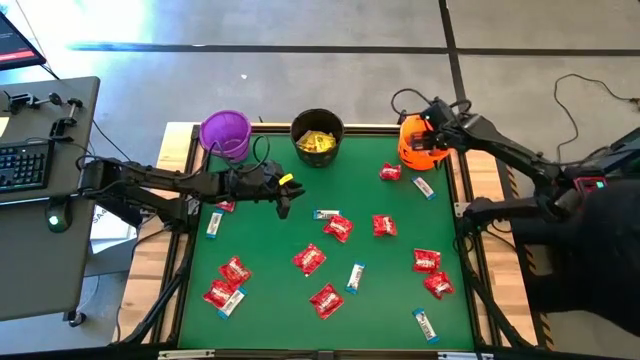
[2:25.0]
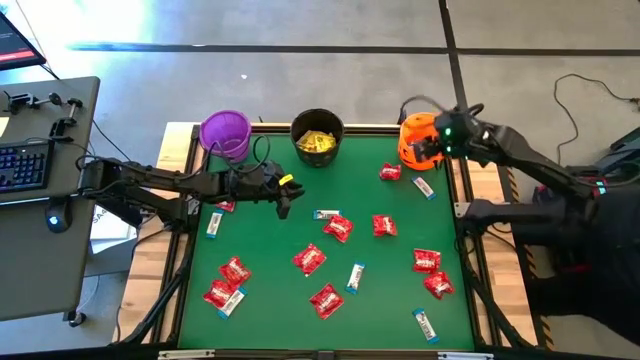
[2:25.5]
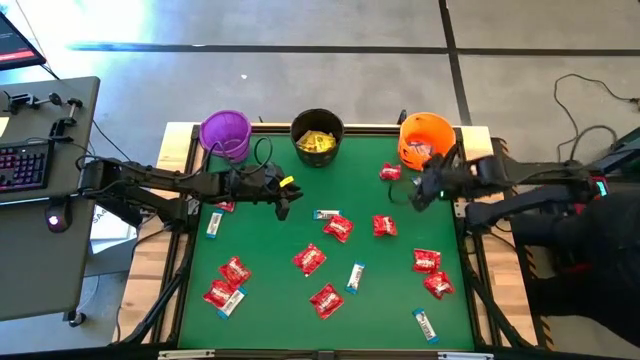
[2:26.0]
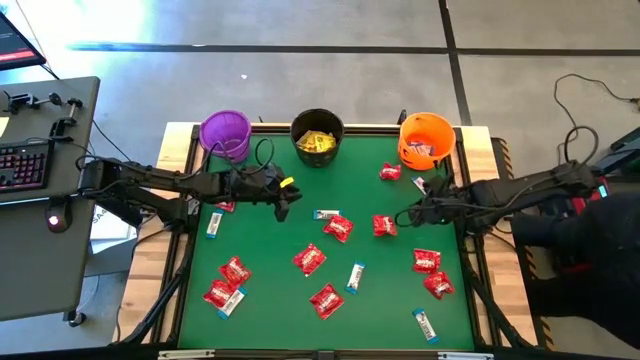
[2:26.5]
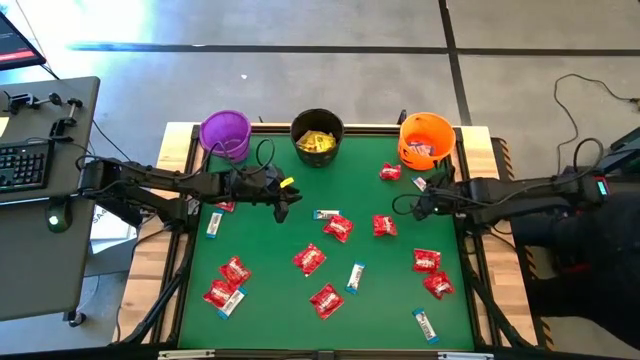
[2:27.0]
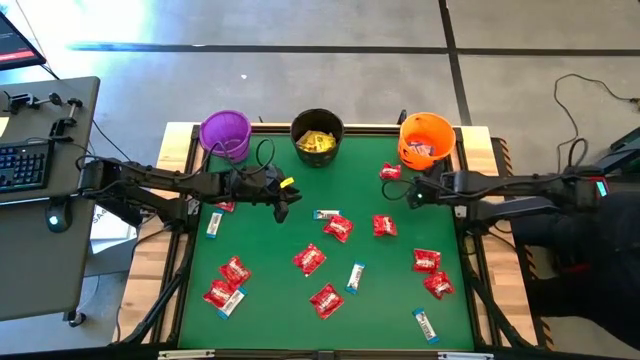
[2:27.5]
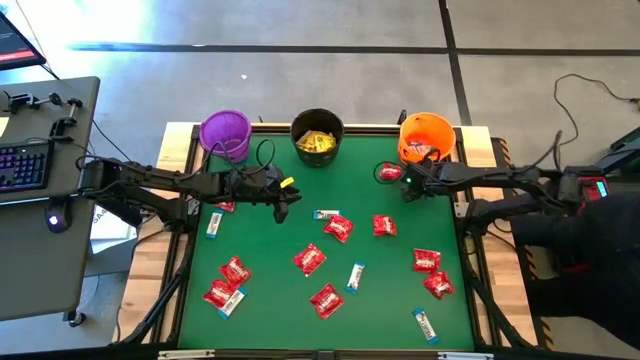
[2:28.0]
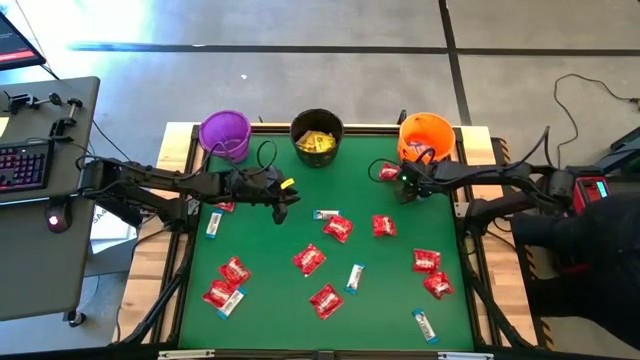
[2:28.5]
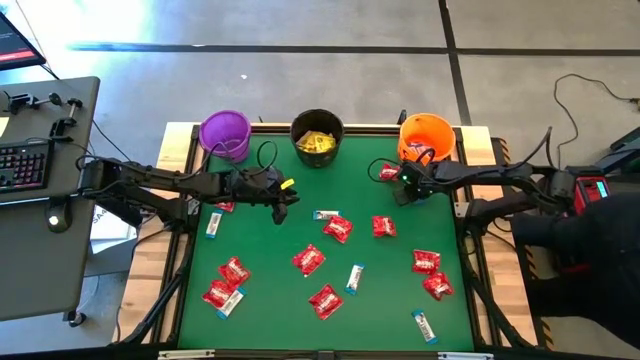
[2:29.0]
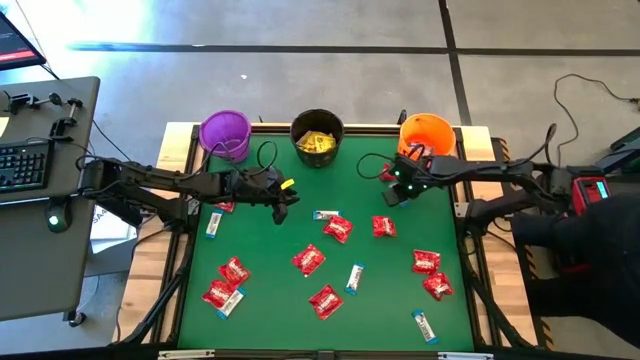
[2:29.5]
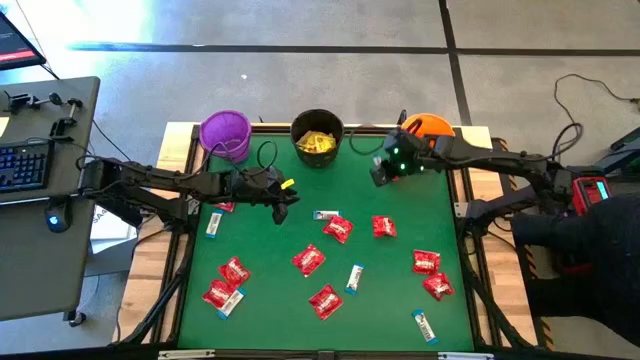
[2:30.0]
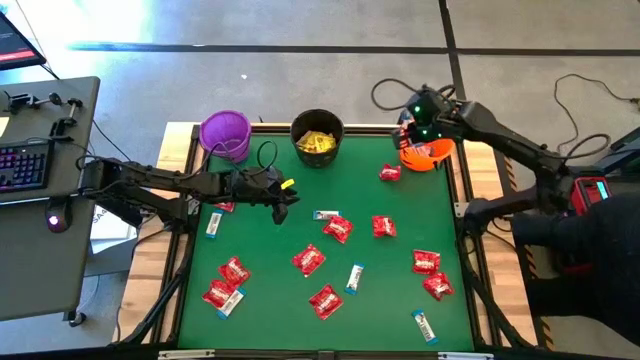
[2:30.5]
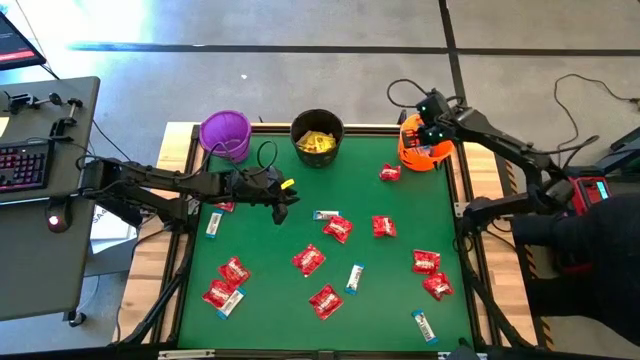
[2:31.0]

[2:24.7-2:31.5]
Task: Sort candy by brand, put in halloween buckets
Put the blue chocolate bar into the orange bucket

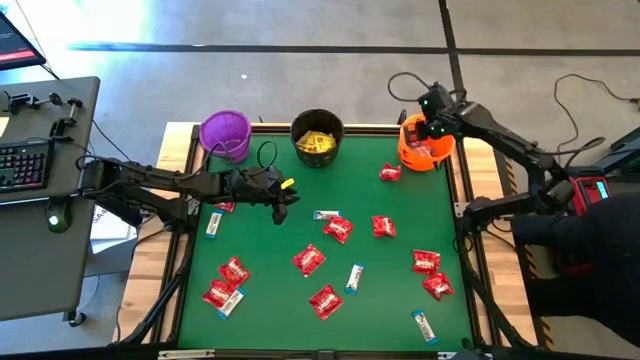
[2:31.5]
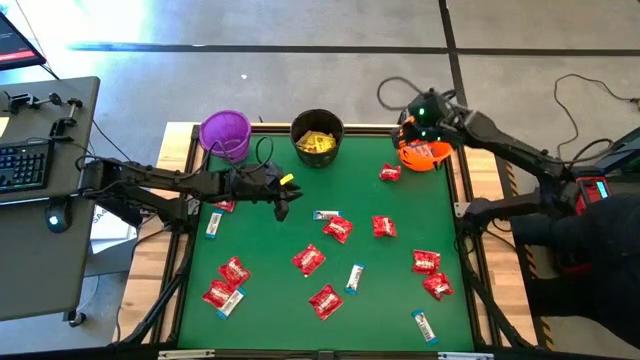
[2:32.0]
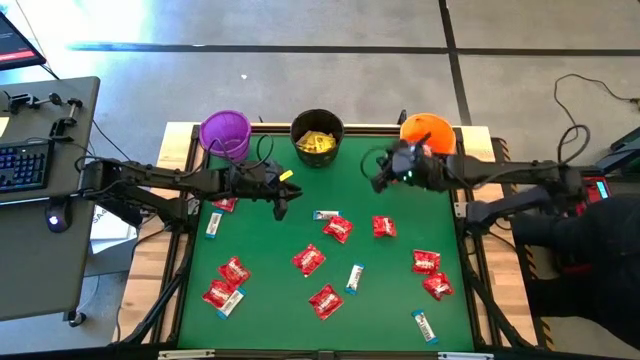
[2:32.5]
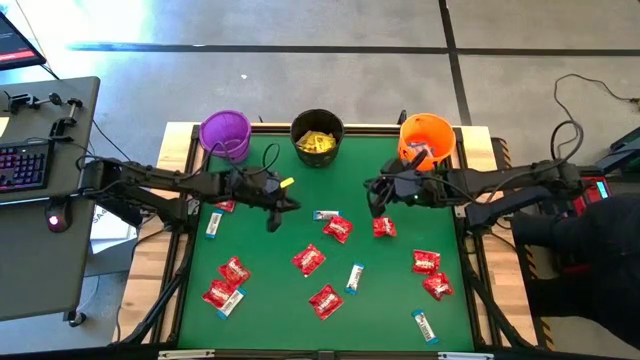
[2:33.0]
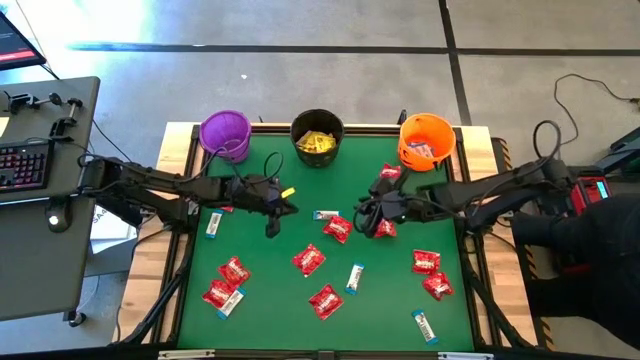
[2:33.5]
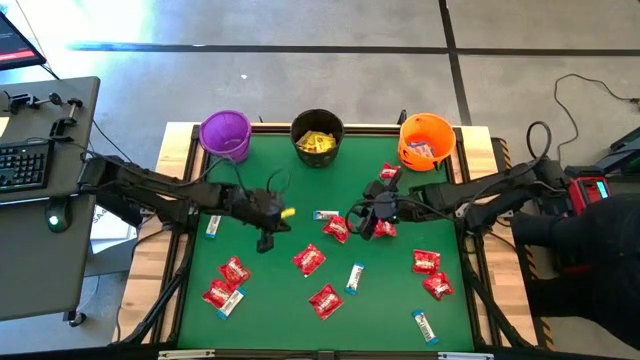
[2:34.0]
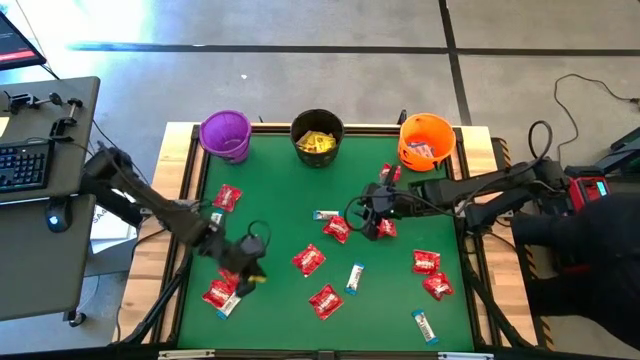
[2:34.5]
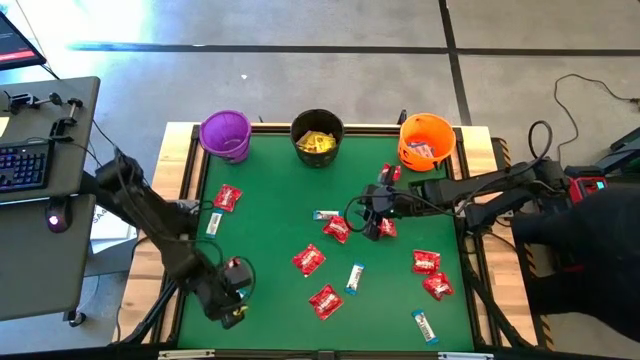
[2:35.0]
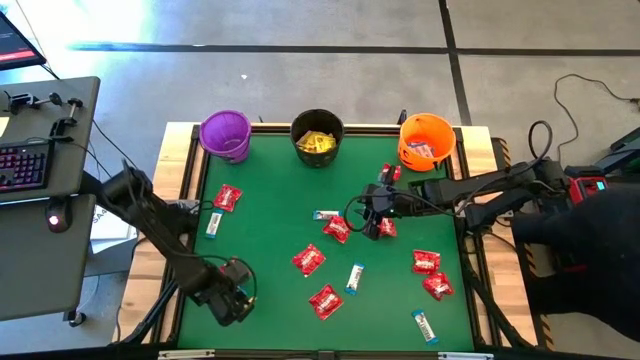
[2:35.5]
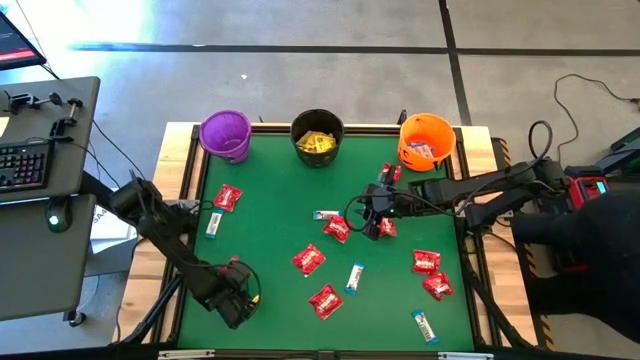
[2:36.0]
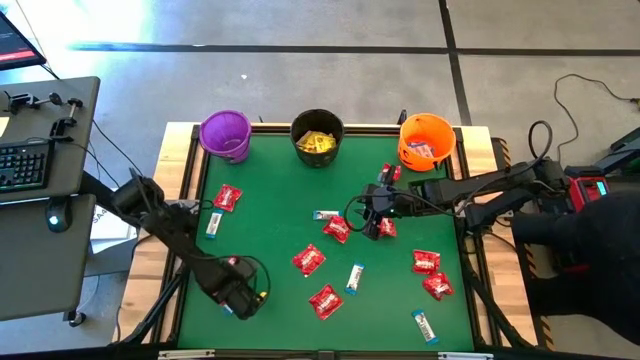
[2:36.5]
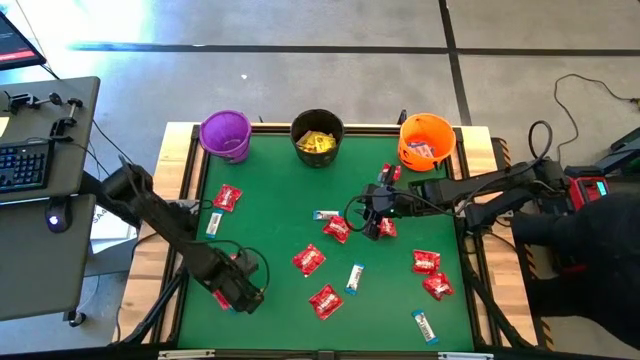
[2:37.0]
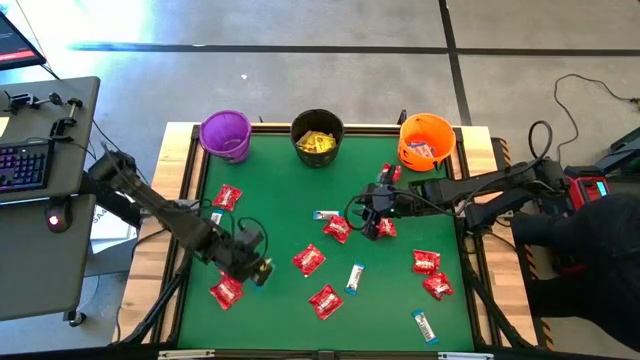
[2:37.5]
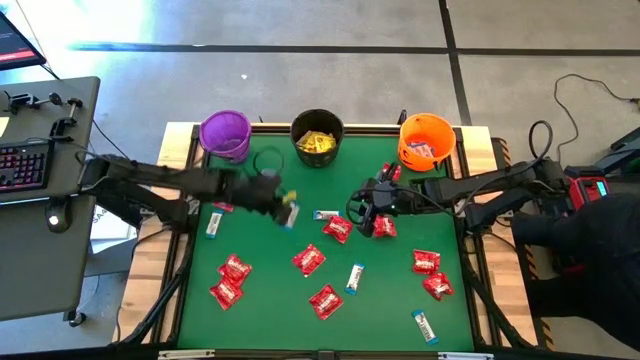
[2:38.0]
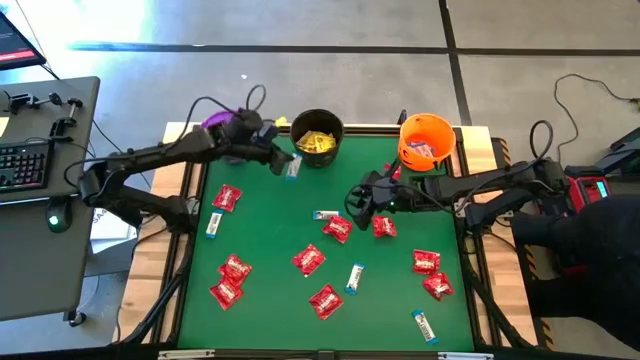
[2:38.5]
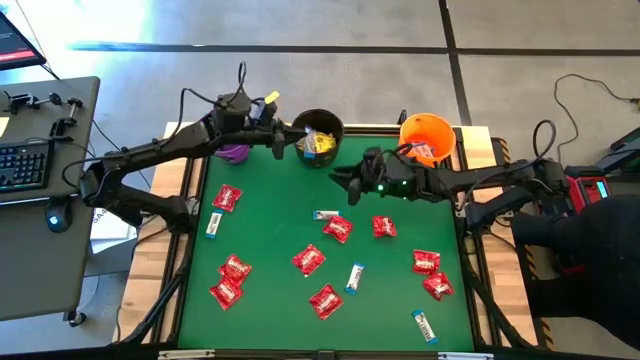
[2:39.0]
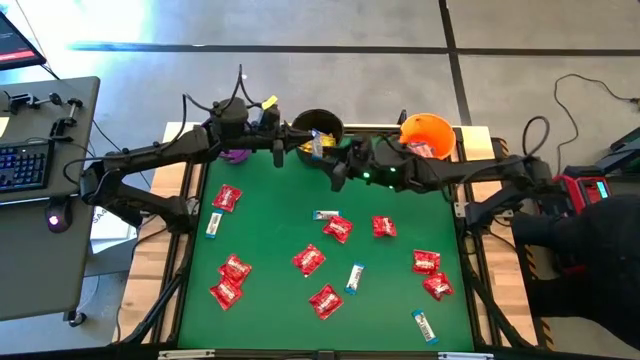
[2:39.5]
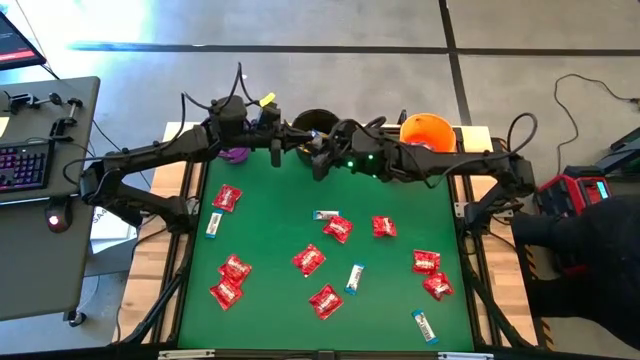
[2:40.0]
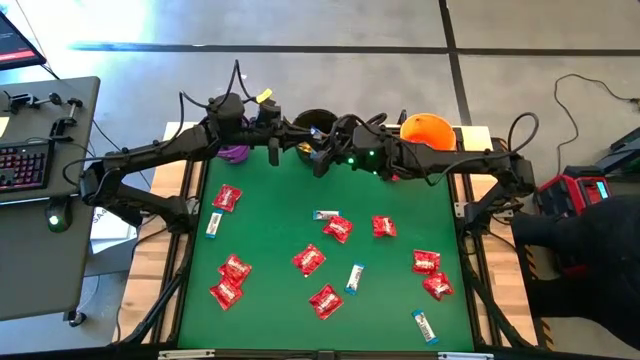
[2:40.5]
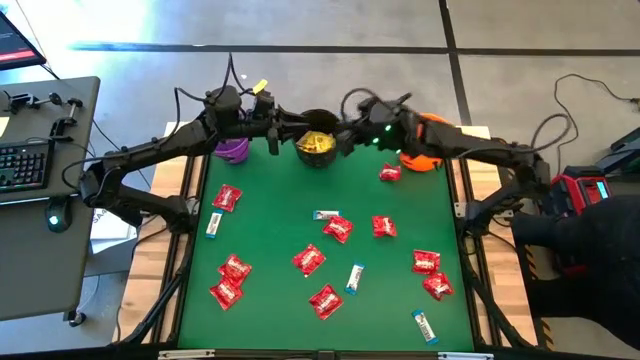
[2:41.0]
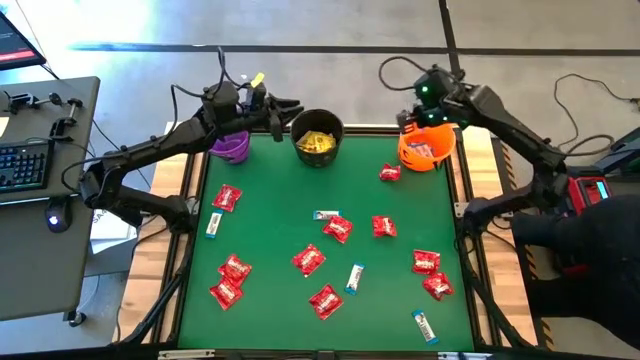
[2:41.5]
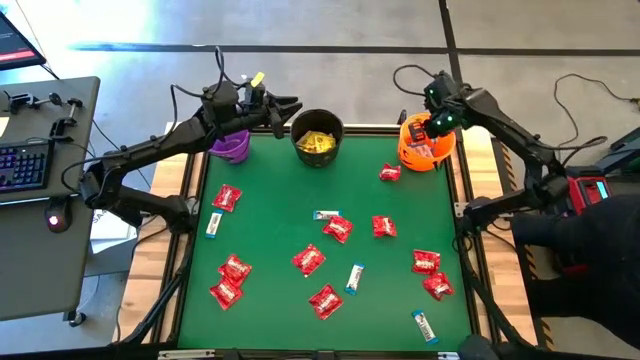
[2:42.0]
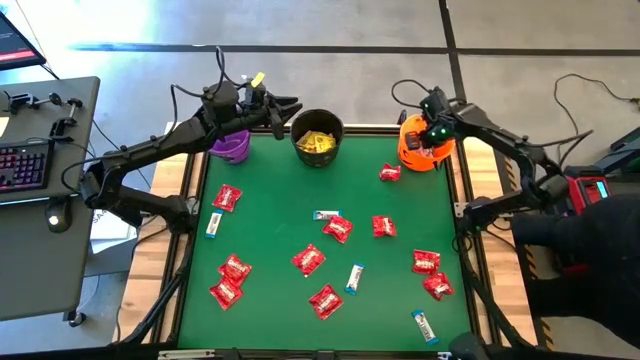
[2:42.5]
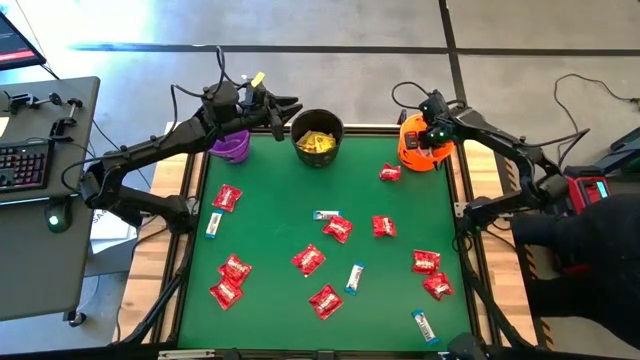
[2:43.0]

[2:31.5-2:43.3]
Put the blue chocolate bar into the orange bucket

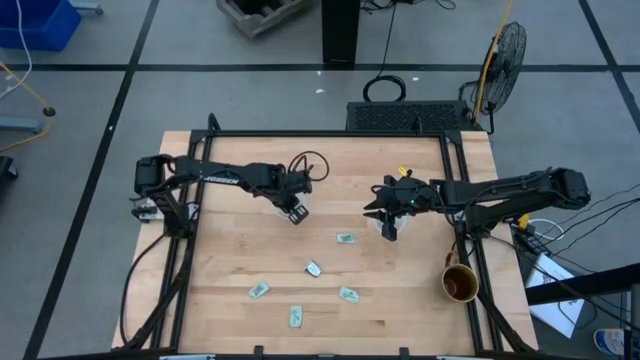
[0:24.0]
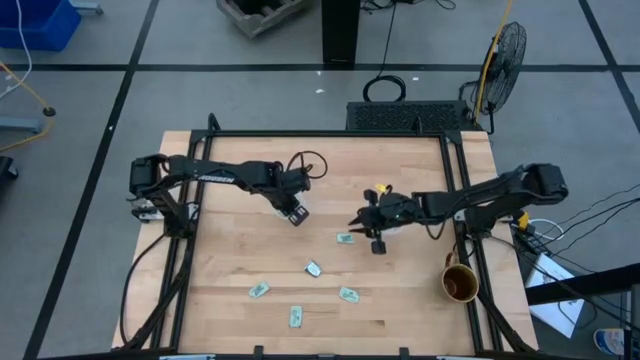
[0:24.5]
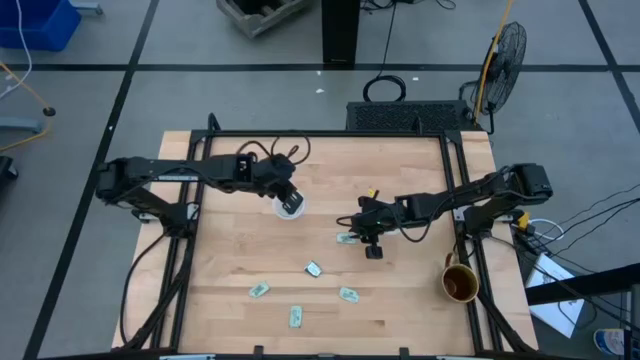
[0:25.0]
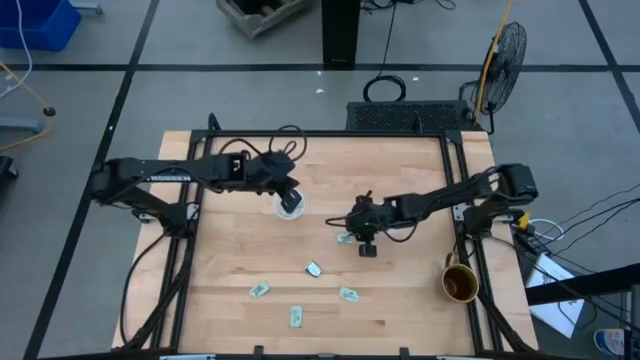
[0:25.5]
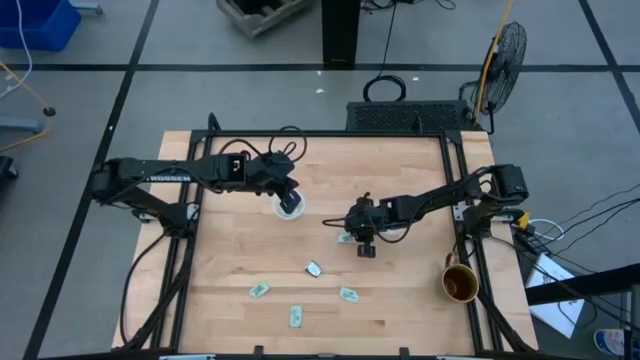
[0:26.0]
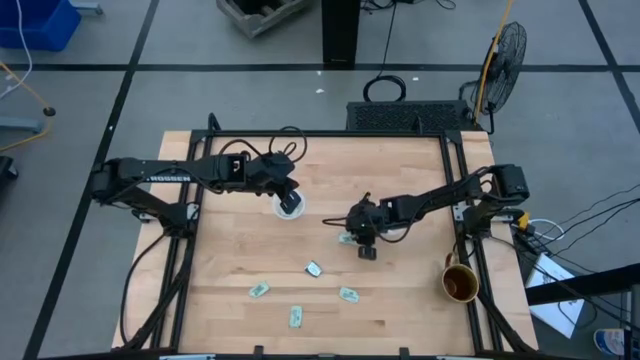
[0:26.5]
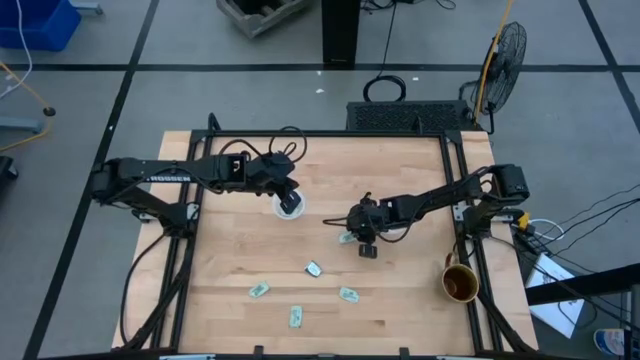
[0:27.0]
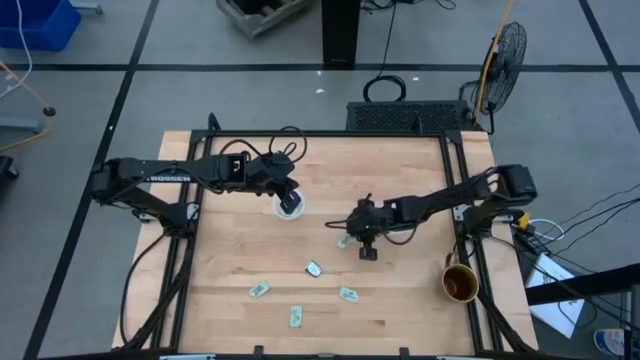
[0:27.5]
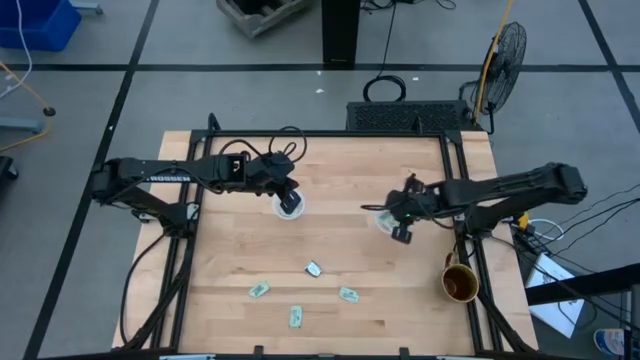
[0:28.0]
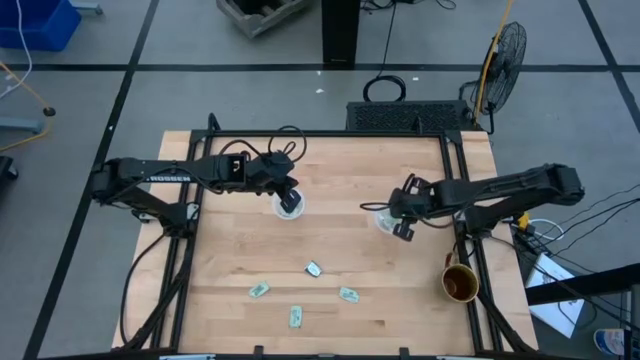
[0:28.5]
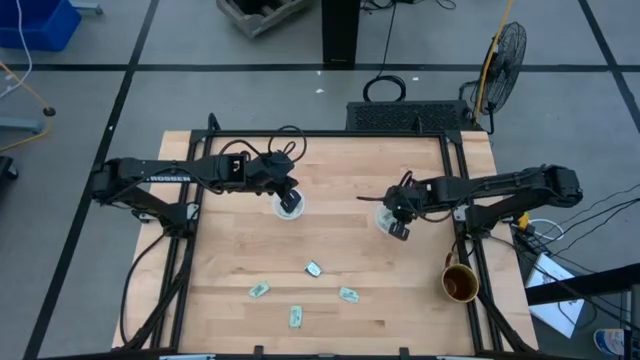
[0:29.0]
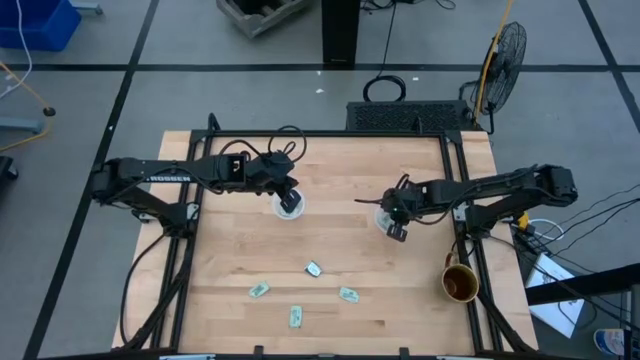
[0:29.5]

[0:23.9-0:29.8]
Task: Pick and place Stevia / Truvia into bins
Put the stevia packet into the right container
